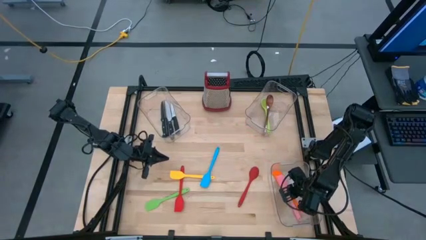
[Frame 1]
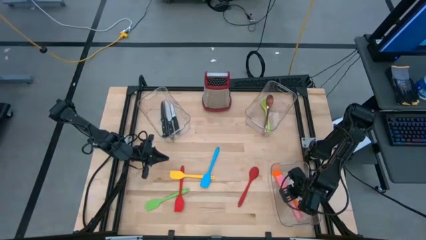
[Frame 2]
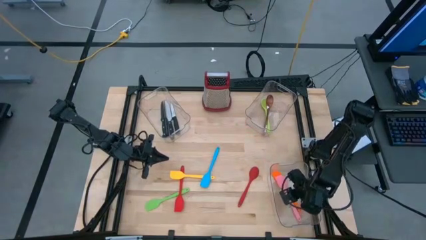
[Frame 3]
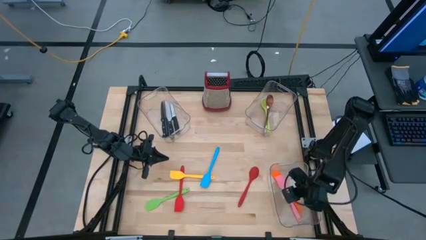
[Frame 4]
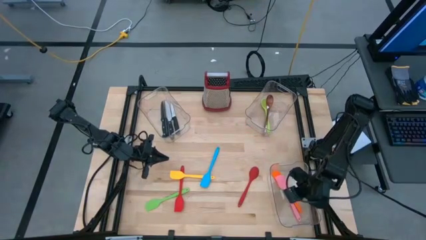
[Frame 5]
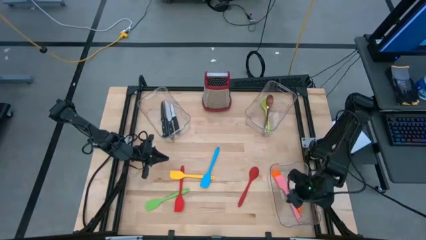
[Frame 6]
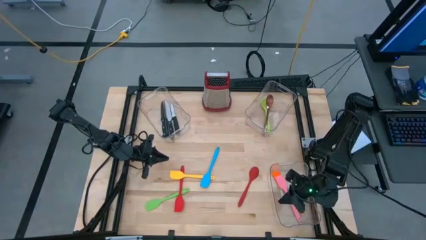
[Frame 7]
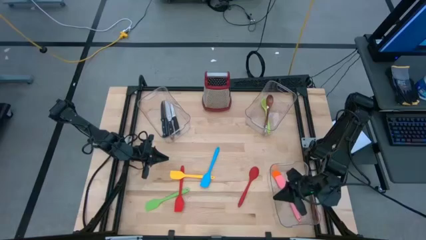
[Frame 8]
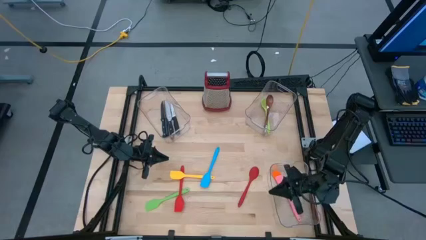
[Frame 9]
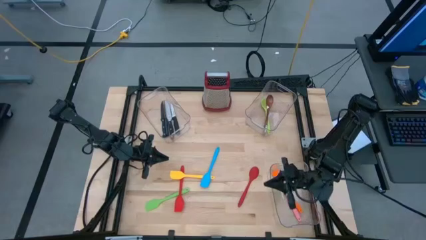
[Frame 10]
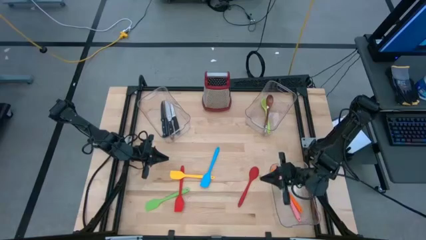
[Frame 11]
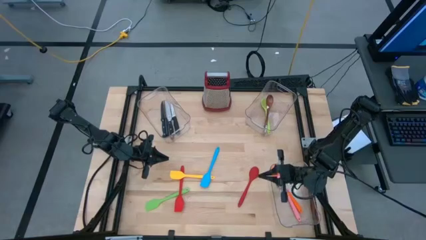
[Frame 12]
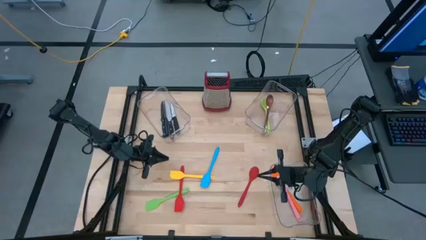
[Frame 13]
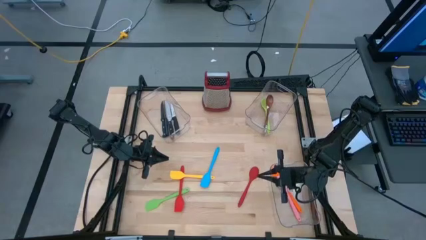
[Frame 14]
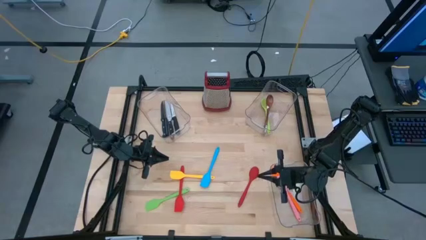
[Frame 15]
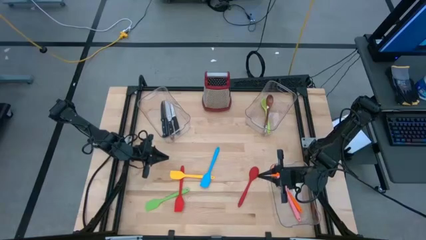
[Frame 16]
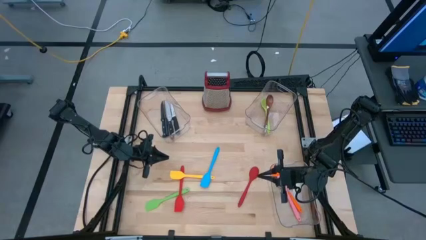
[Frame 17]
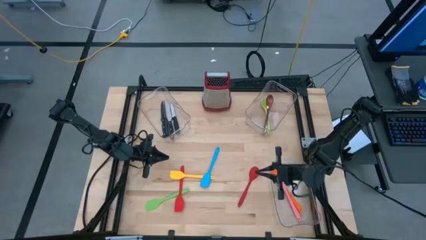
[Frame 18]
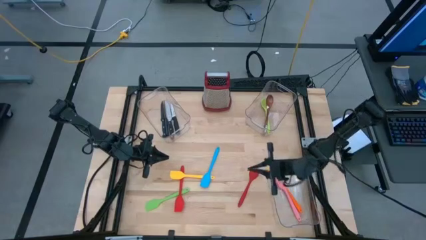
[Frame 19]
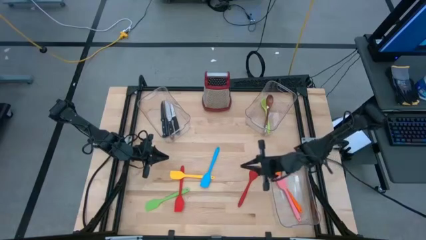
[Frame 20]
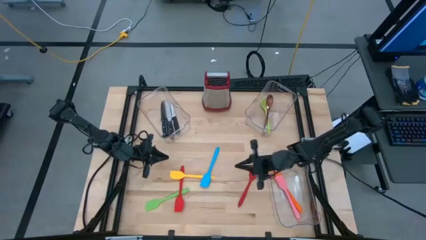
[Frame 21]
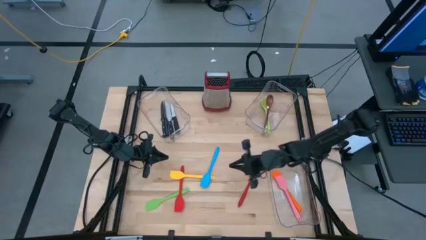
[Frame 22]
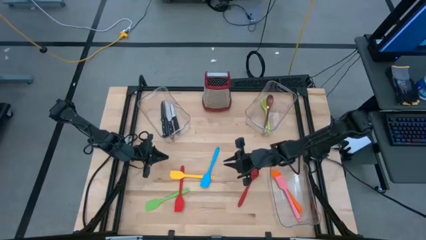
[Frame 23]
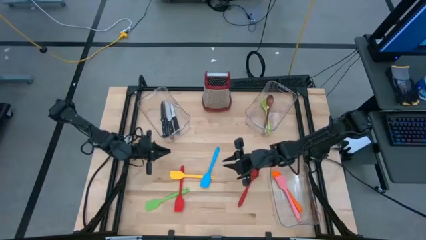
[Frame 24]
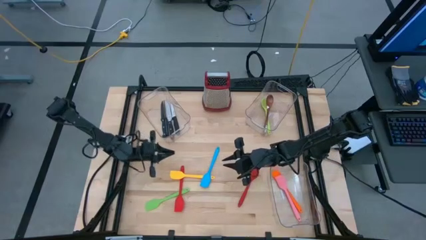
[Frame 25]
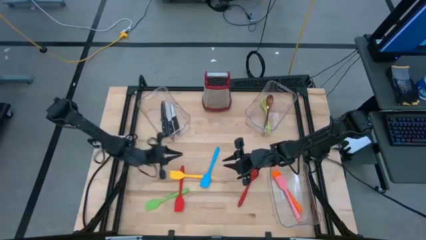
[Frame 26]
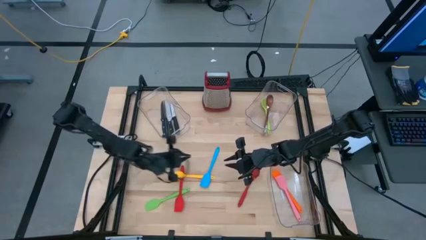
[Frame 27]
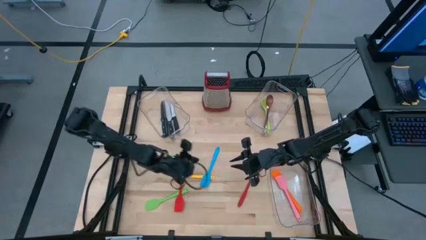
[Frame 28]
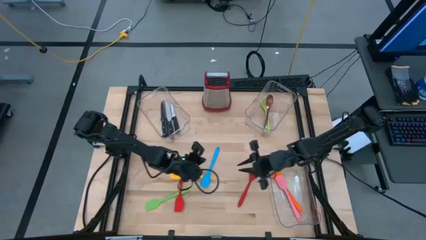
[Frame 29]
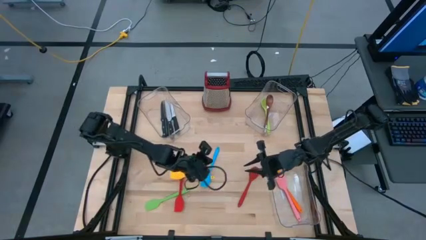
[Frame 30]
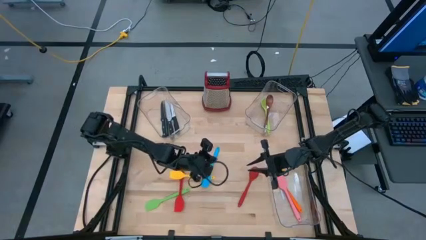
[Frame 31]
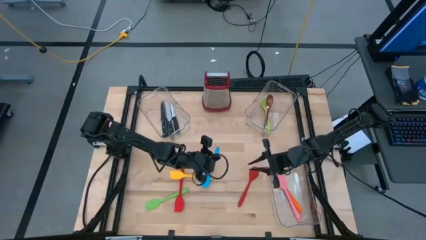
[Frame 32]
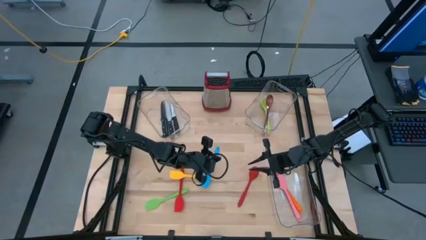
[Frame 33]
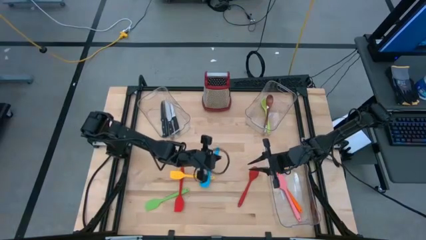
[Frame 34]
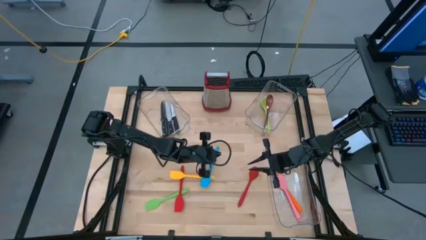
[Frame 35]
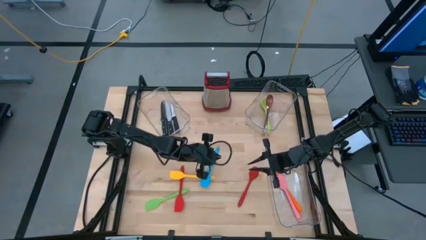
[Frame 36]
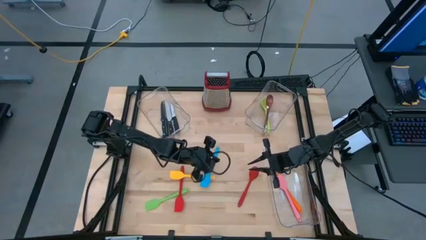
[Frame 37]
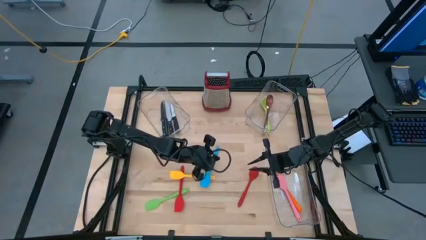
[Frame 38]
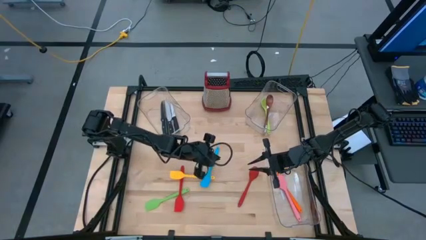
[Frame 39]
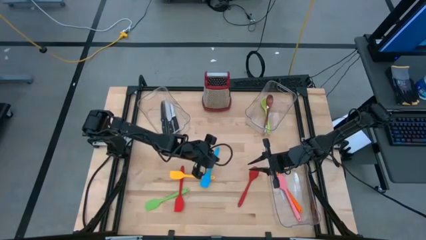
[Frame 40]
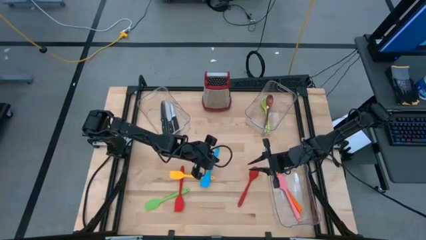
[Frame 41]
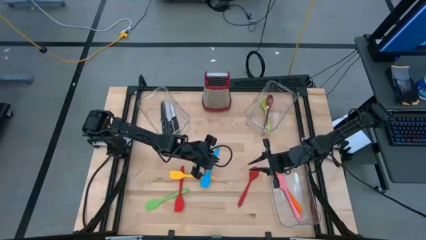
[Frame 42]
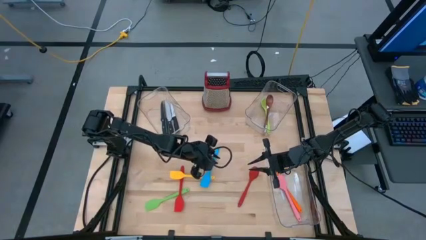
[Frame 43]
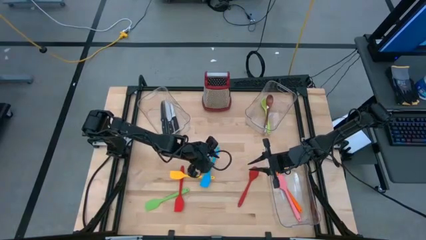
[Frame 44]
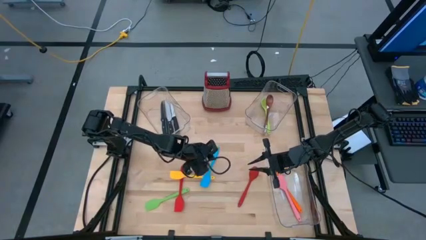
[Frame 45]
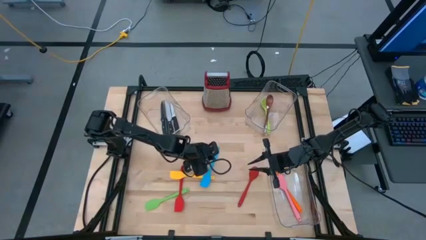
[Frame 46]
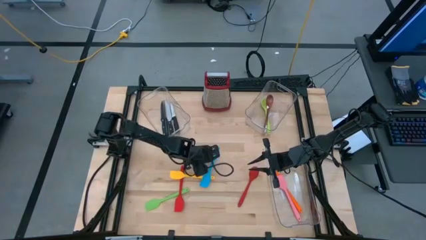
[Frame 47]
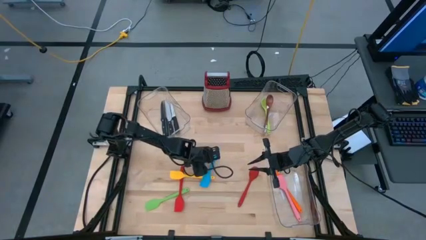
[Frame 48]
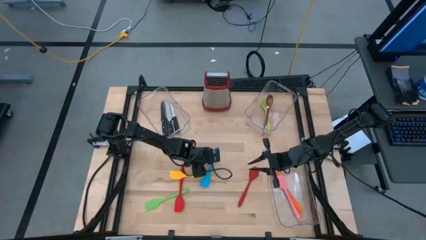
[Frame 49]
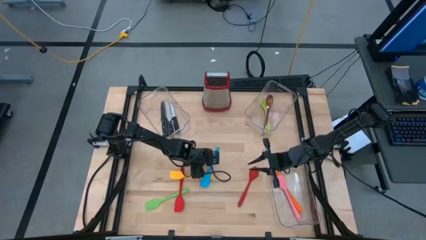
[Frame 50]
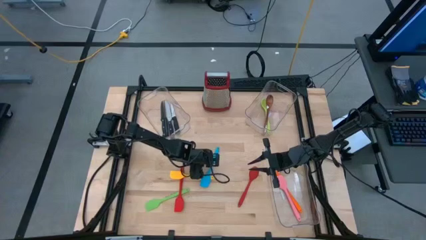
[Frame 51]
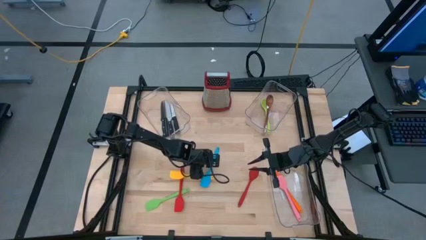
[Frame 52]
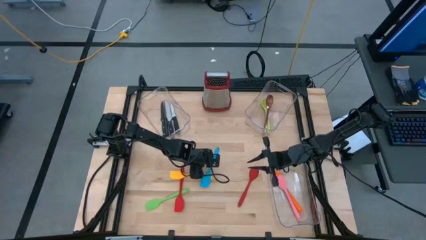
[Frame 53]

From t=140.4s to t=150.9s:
Task: Pick & Place Kitchen Items
Put the blue spatula into the bottom right transparent bin
